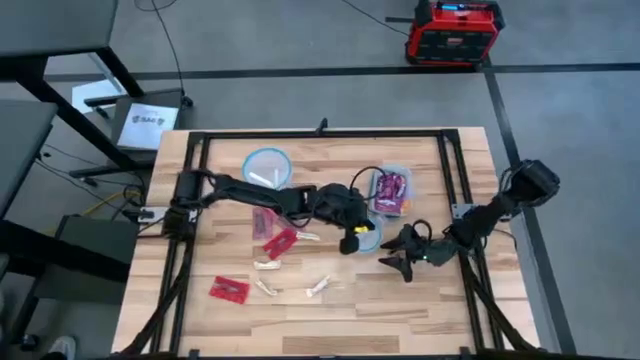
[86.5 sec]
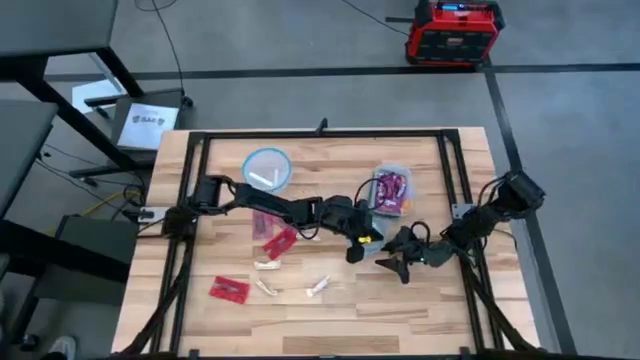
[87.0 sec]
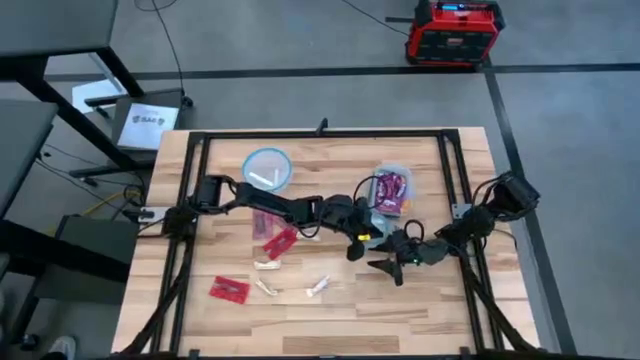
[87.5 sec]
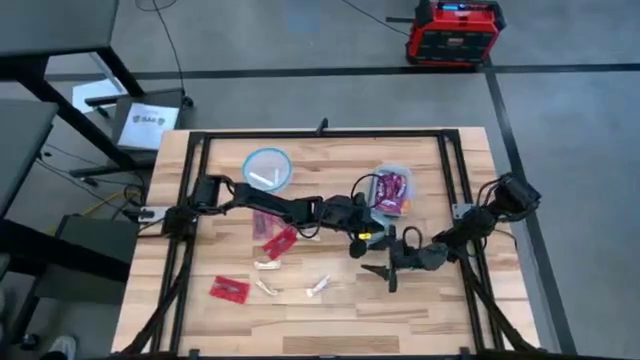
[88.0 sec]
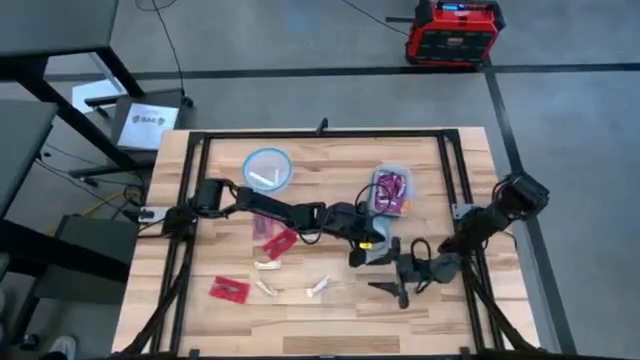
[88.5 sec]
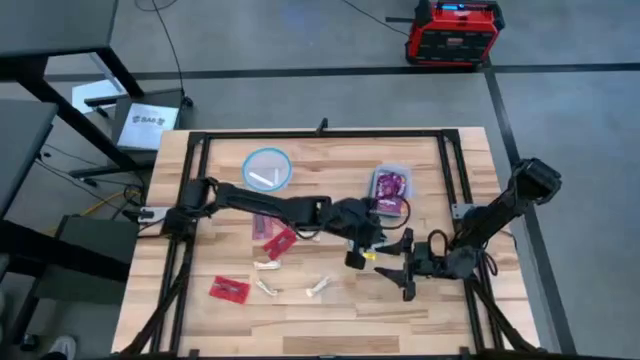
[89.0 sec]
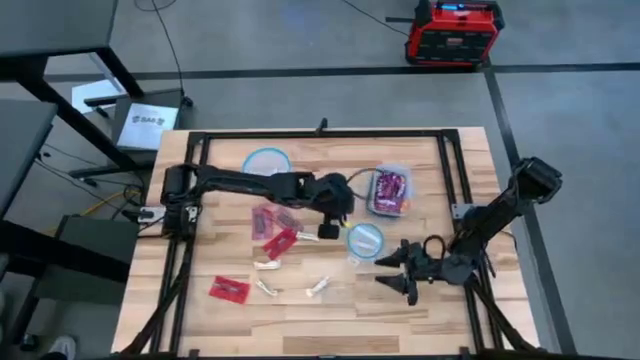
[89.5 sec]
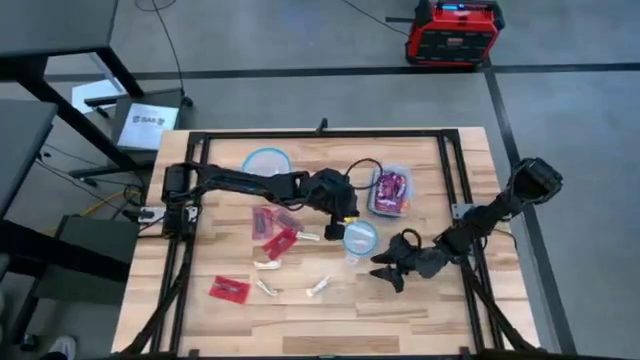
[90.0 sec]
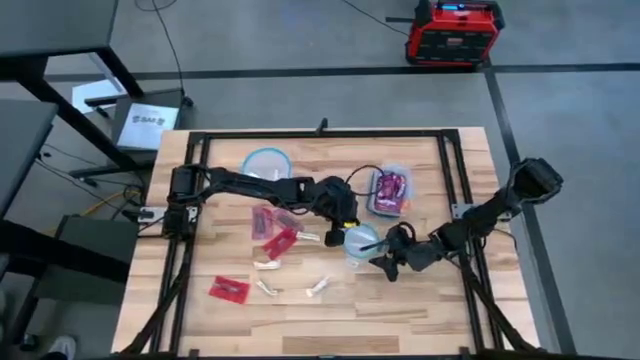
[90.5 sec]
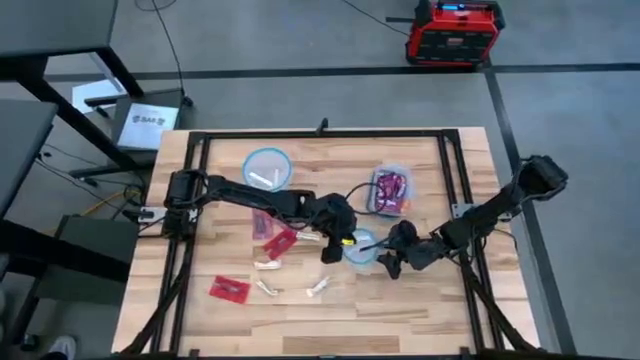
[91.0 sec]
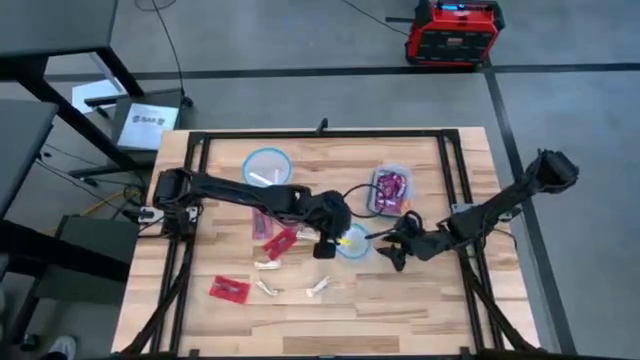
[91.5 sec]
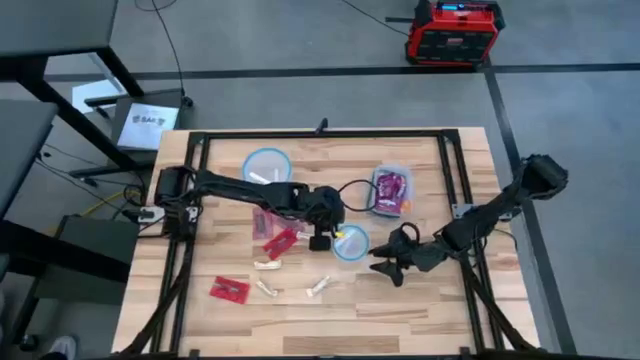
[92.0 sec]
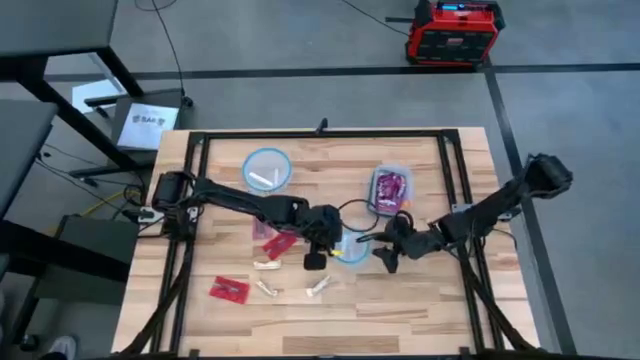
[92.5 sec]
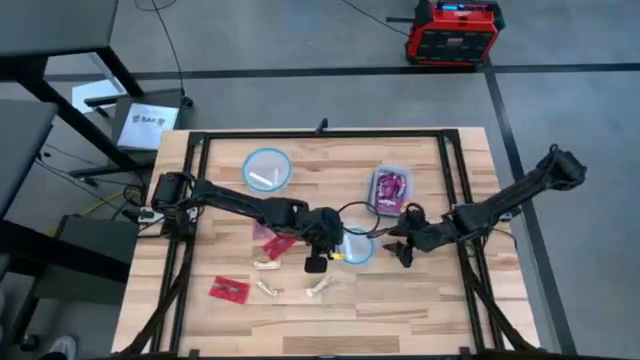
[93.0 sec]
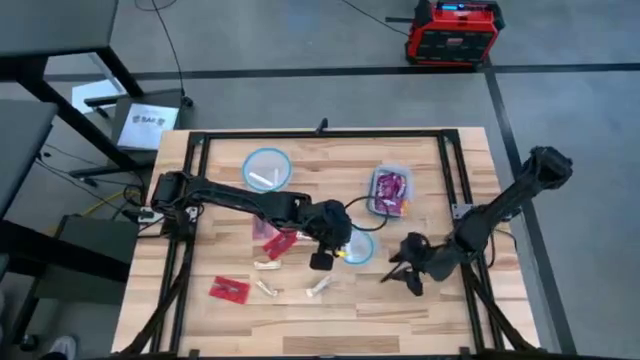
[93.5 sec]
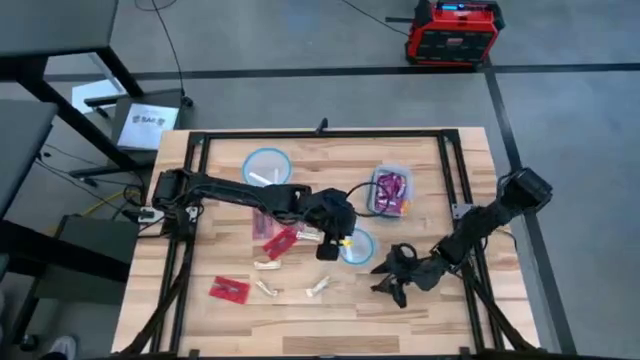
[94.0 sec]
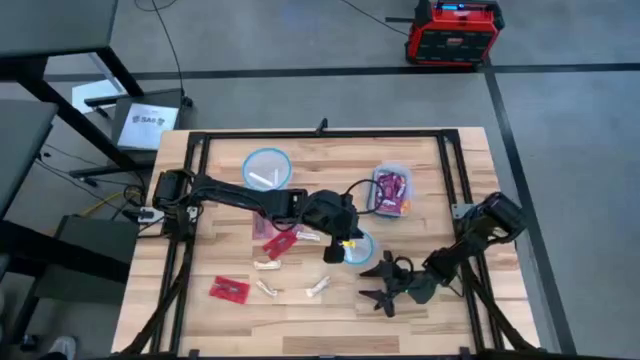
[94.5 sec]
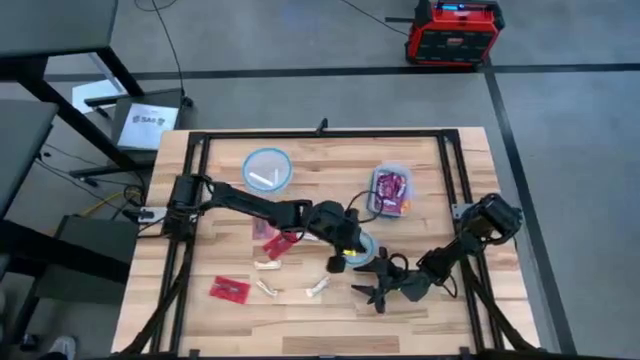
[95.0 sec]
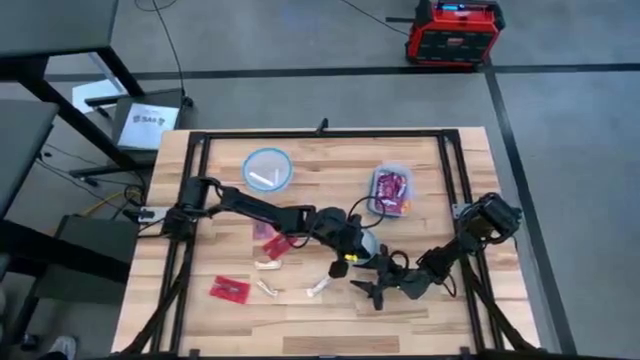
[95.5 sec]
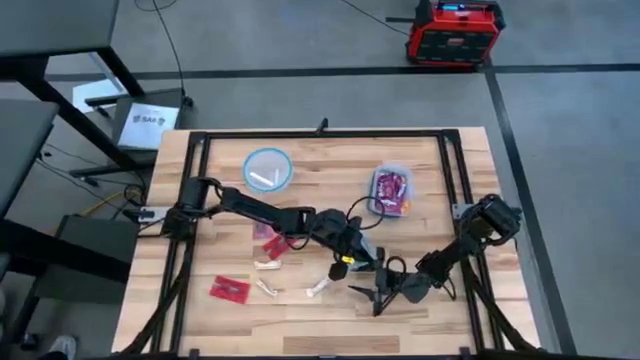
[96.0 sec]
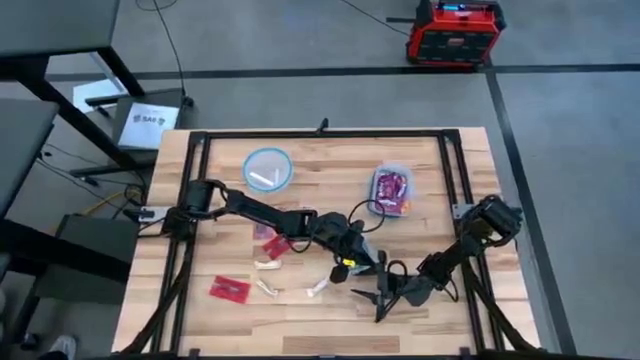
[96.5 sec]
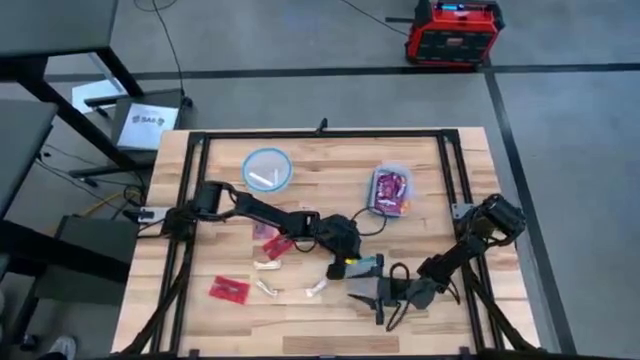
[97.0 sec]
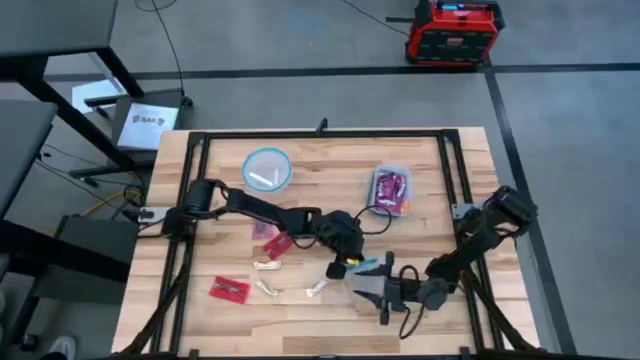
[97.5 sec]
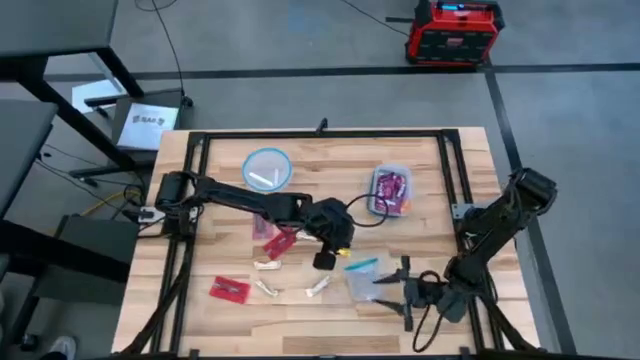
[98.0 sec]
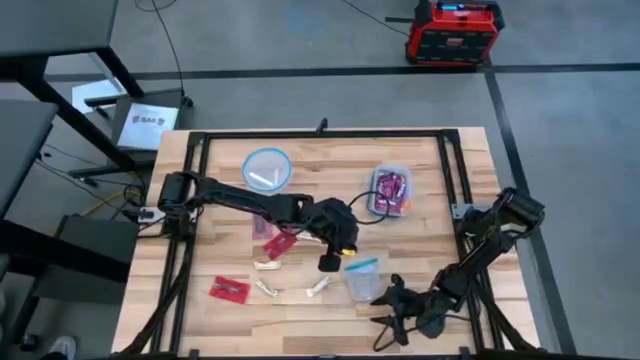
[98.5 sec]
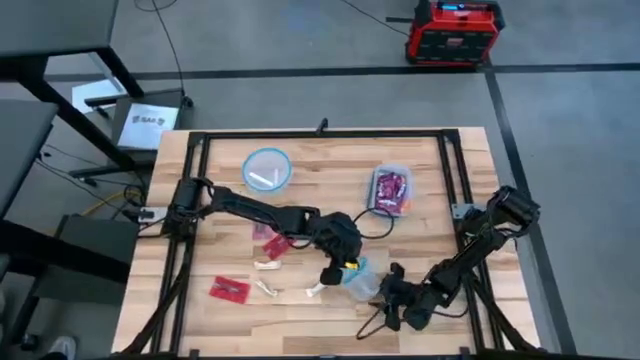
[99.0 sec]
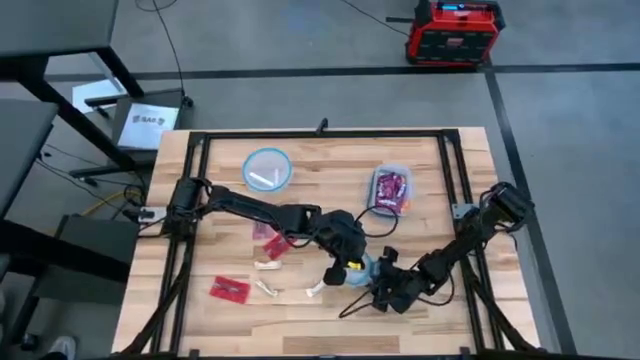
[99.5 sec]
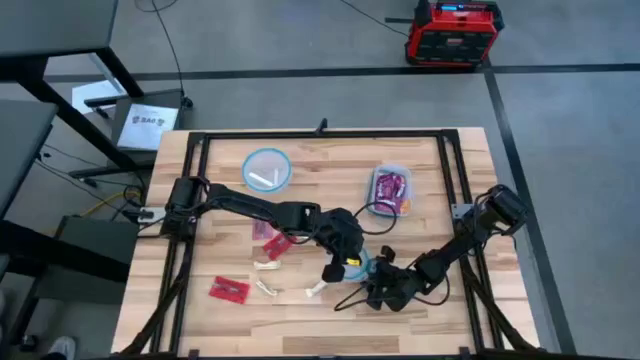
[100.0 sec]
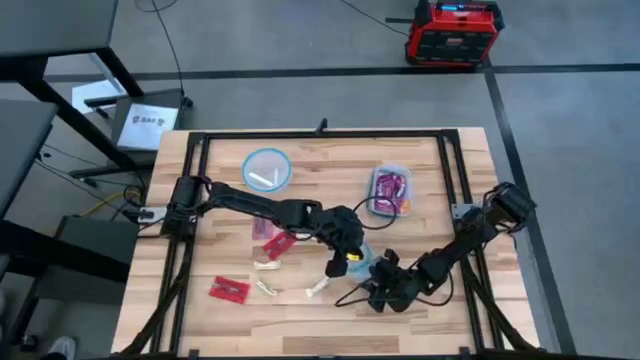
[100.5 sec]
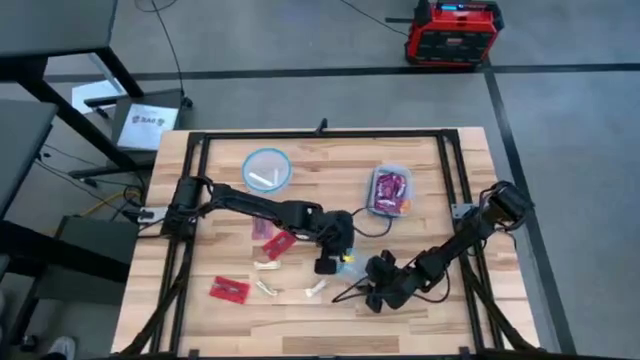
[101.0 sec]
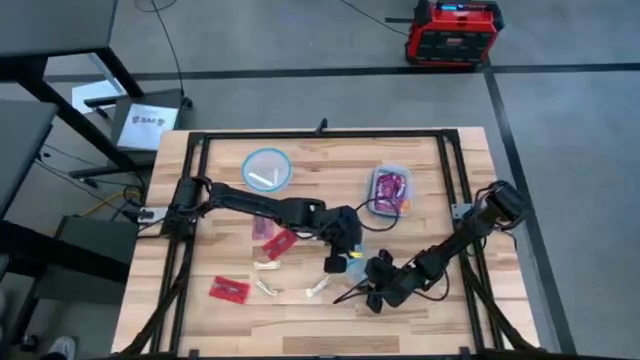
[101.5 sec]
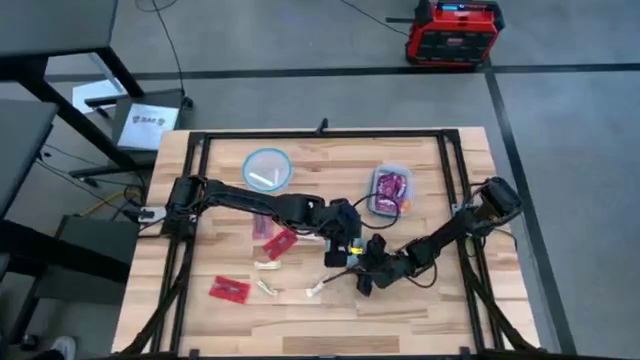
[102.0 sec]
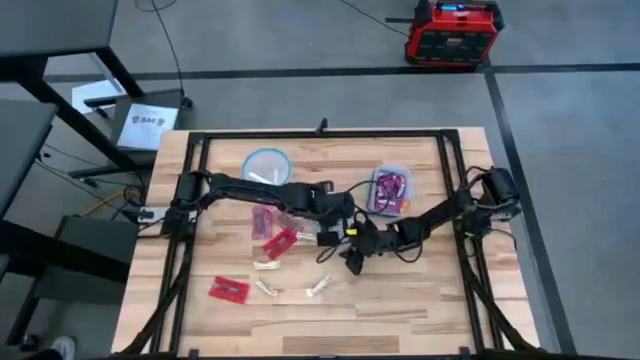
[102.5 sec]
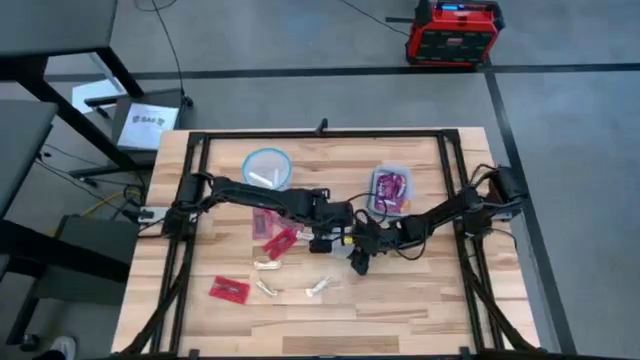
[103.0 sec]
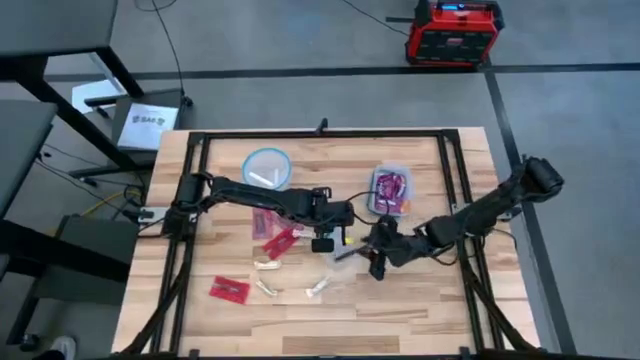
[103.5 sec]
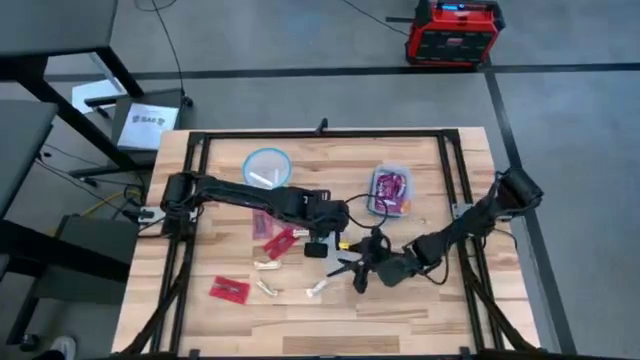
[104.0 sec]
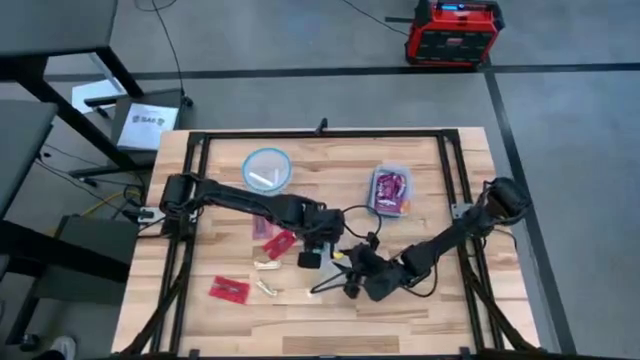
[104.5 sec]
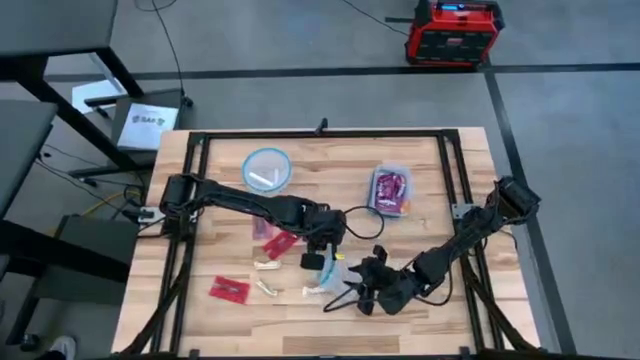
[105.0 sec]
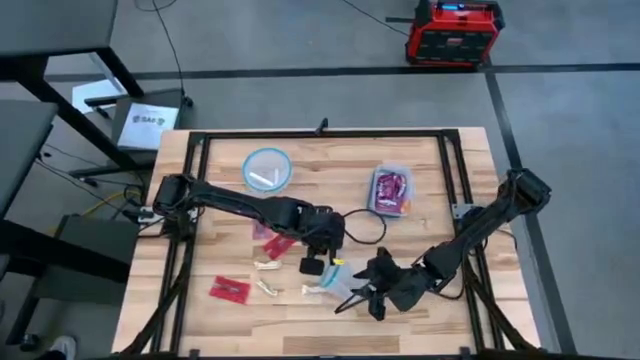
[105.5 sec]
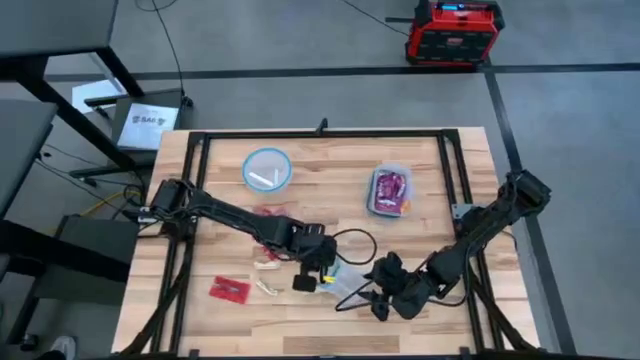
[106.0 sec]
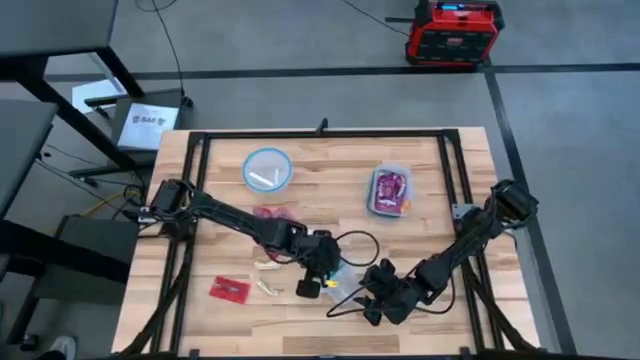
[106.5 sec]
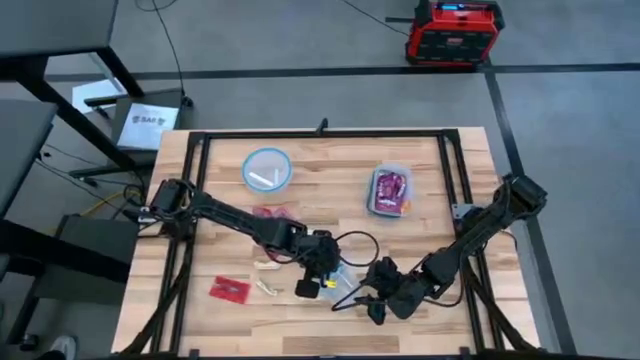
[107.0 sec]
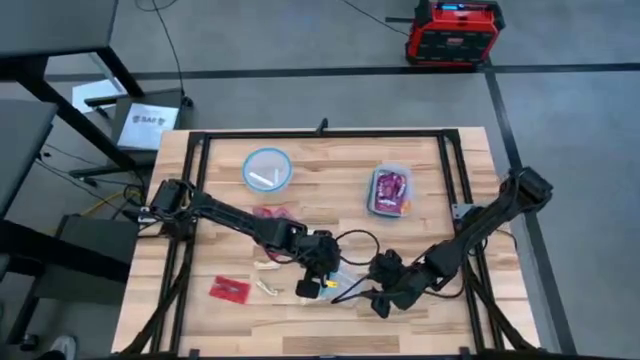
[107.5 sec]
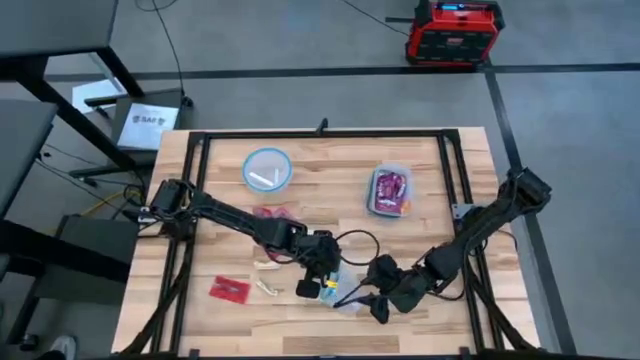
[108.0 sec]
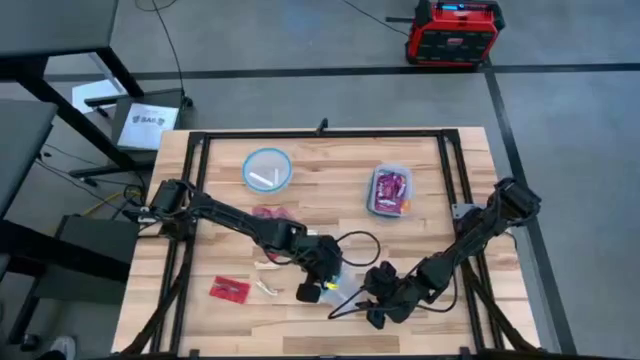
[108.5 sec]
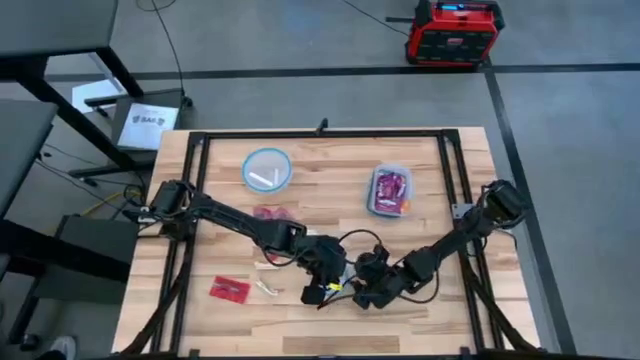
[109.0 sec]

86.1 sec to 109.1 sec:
Task: Sort candy
Open the center transparent bin
